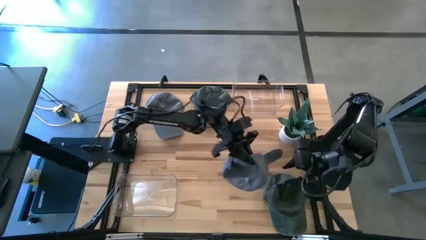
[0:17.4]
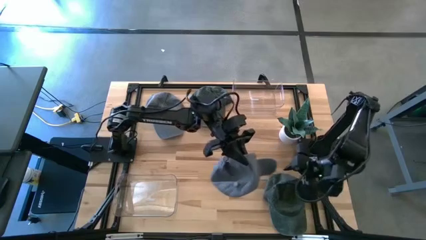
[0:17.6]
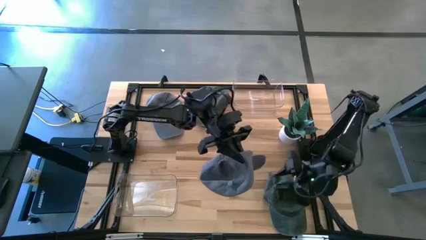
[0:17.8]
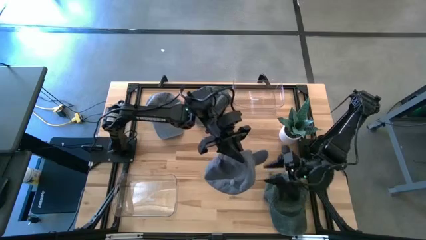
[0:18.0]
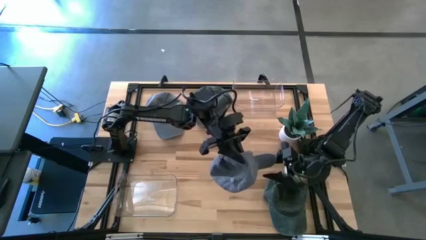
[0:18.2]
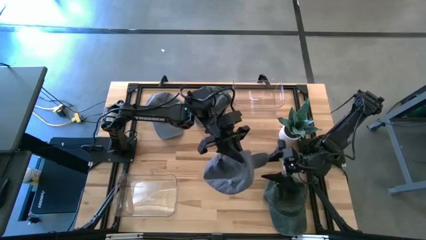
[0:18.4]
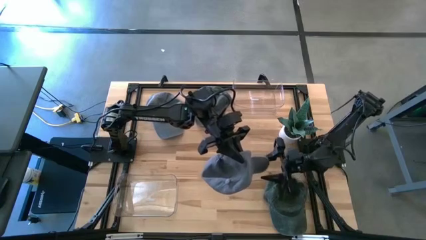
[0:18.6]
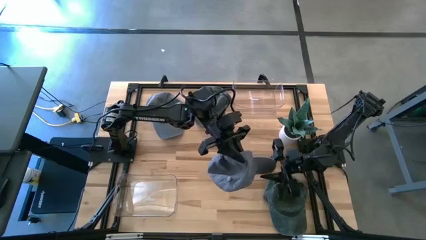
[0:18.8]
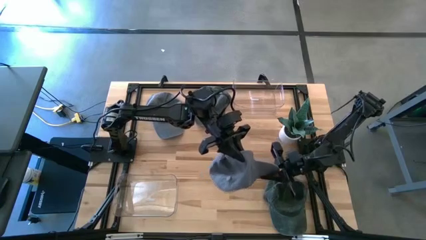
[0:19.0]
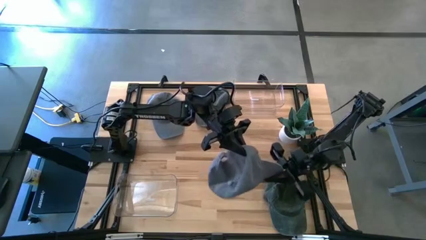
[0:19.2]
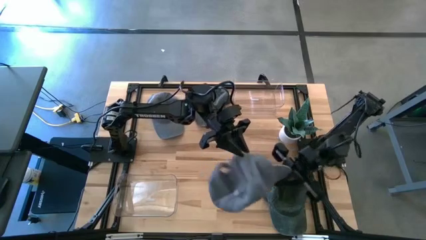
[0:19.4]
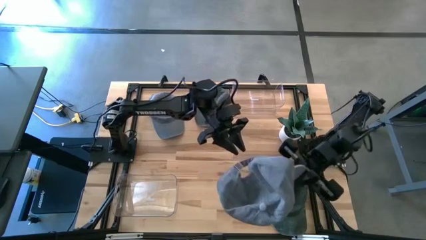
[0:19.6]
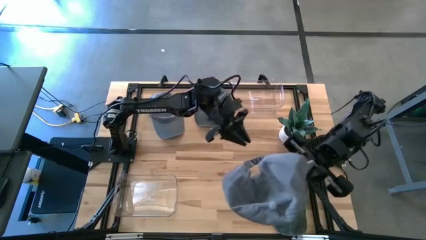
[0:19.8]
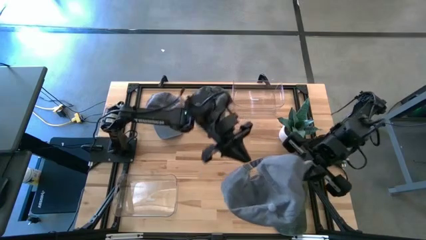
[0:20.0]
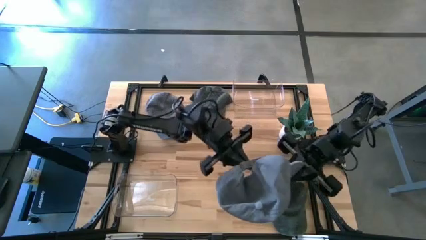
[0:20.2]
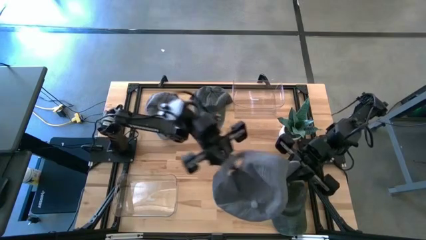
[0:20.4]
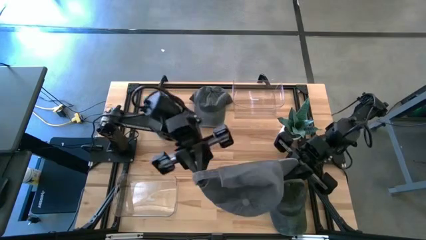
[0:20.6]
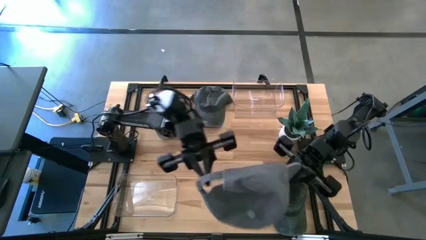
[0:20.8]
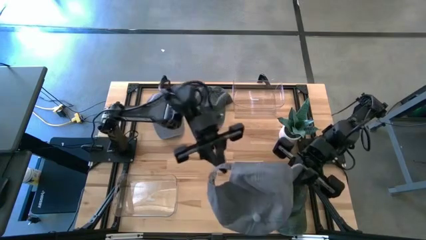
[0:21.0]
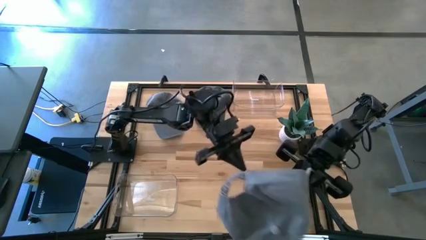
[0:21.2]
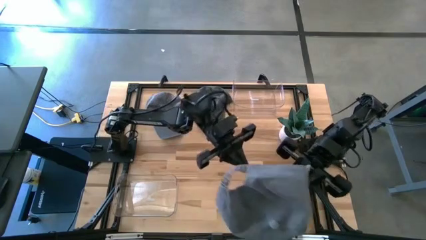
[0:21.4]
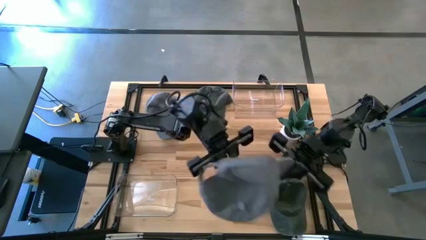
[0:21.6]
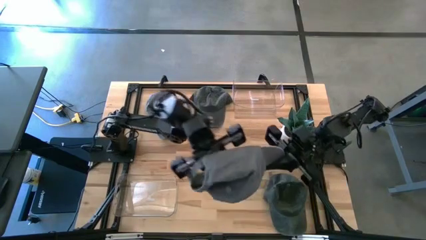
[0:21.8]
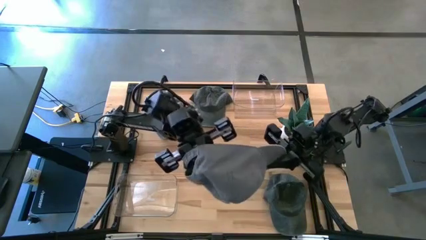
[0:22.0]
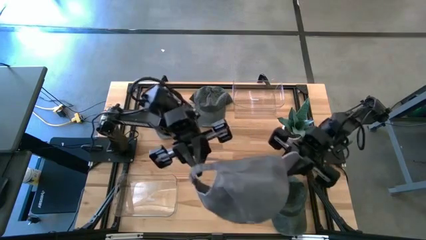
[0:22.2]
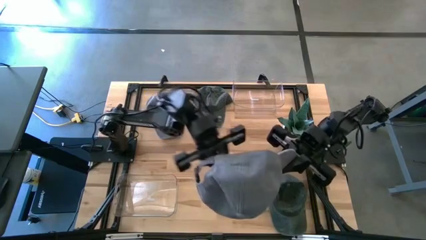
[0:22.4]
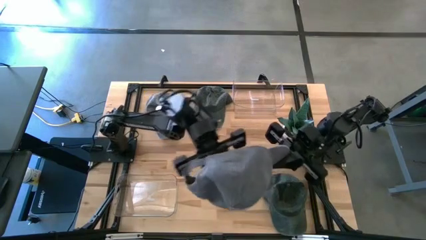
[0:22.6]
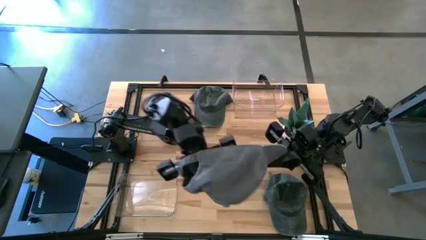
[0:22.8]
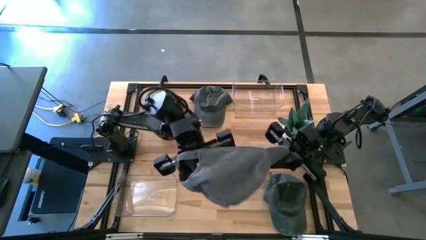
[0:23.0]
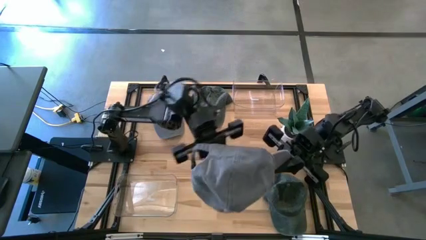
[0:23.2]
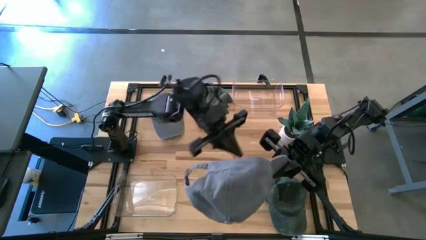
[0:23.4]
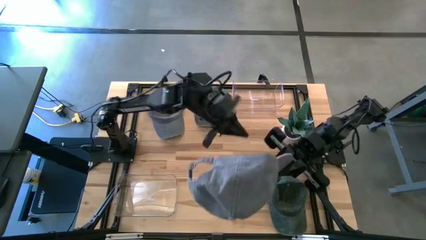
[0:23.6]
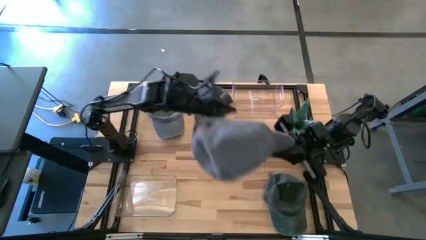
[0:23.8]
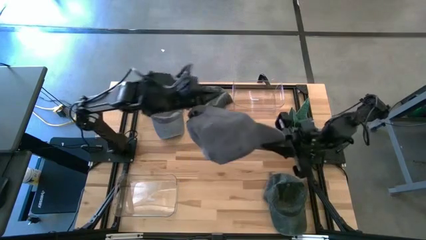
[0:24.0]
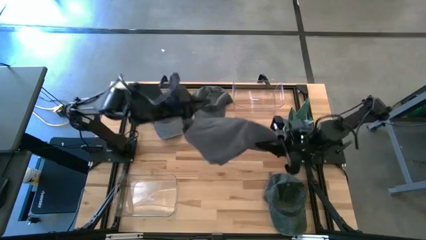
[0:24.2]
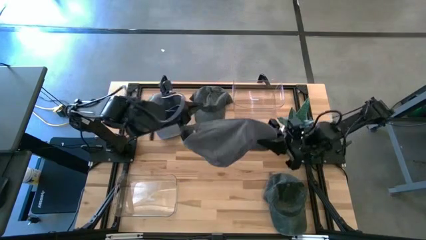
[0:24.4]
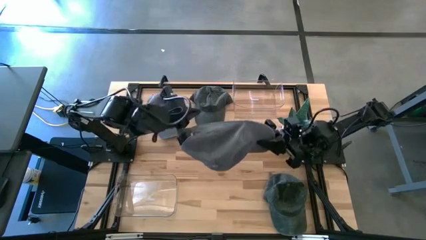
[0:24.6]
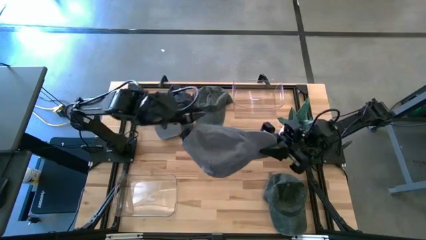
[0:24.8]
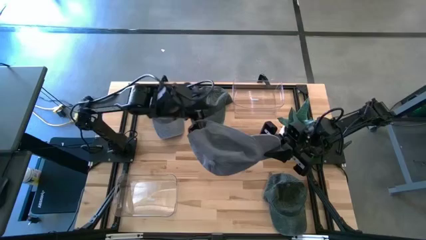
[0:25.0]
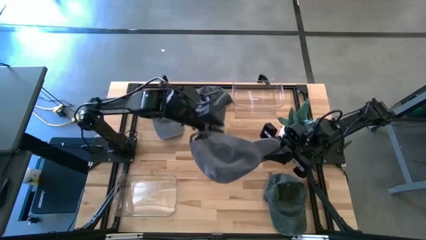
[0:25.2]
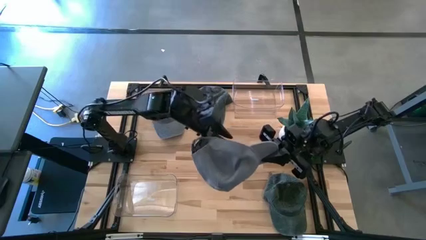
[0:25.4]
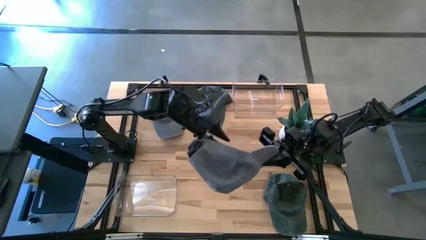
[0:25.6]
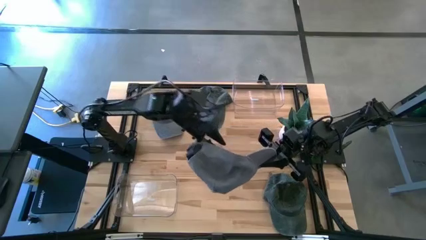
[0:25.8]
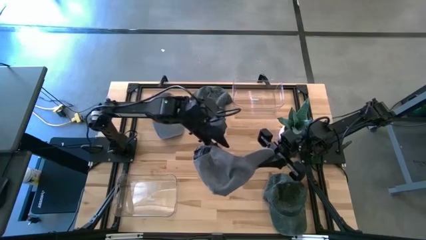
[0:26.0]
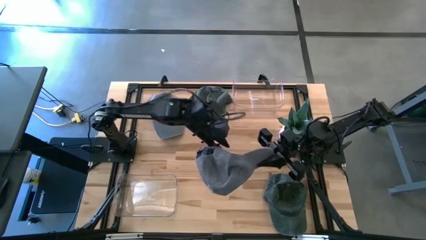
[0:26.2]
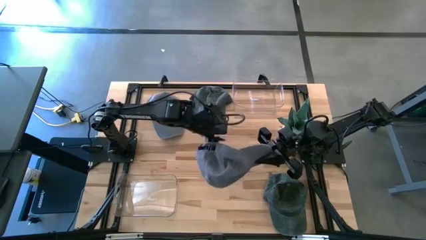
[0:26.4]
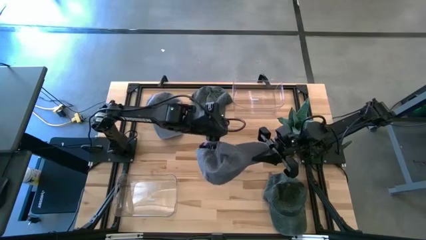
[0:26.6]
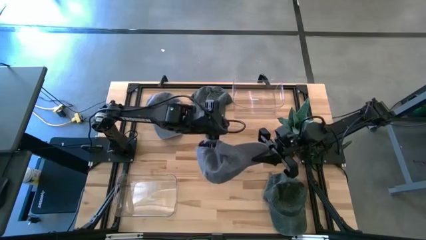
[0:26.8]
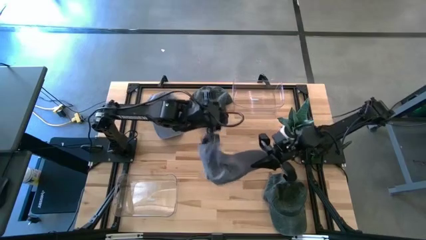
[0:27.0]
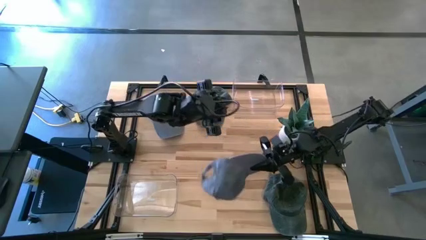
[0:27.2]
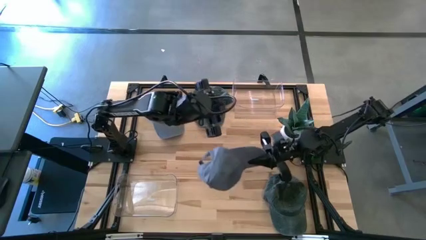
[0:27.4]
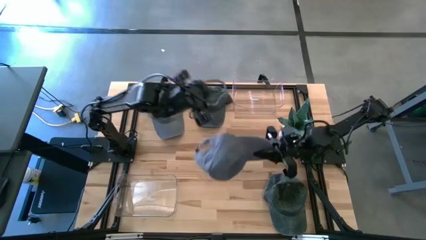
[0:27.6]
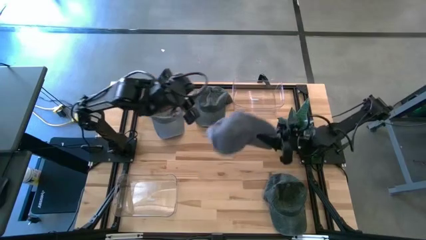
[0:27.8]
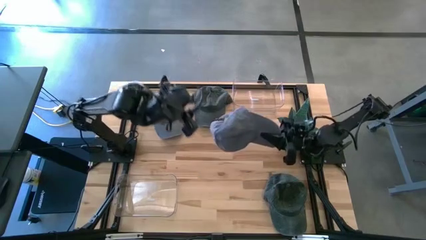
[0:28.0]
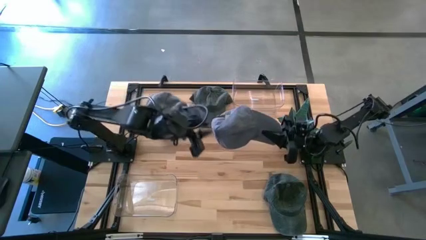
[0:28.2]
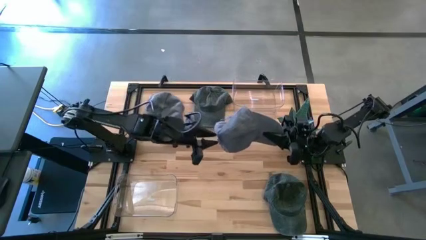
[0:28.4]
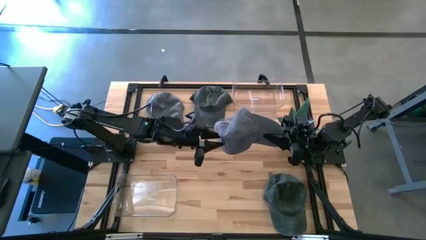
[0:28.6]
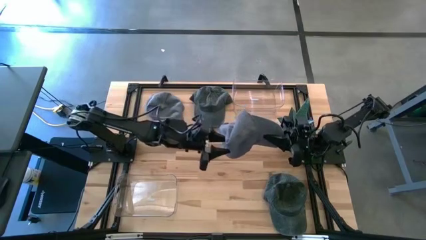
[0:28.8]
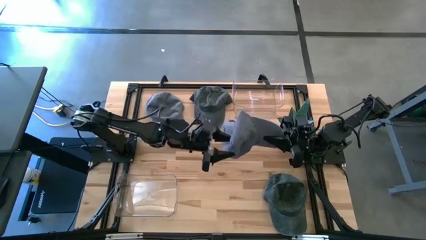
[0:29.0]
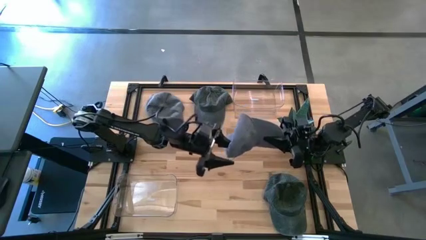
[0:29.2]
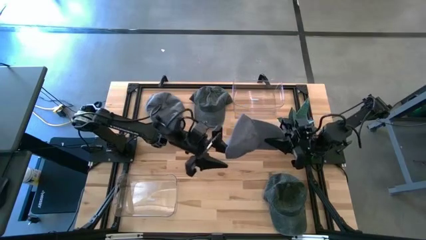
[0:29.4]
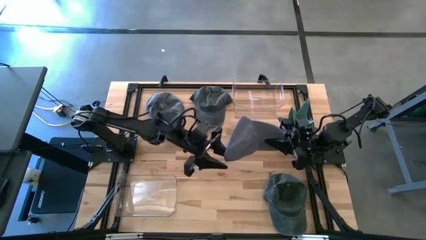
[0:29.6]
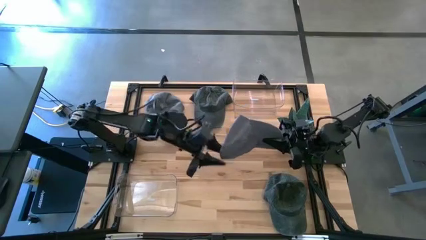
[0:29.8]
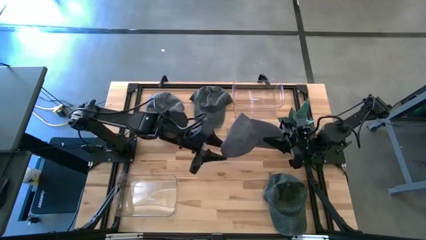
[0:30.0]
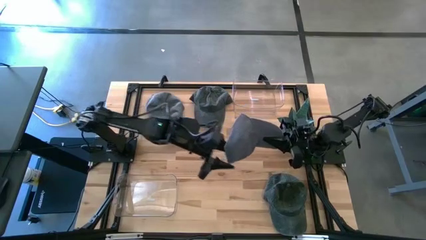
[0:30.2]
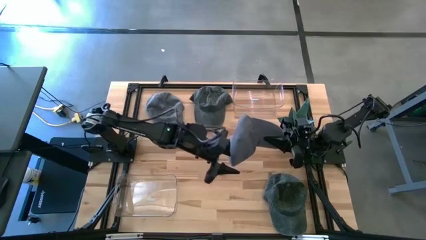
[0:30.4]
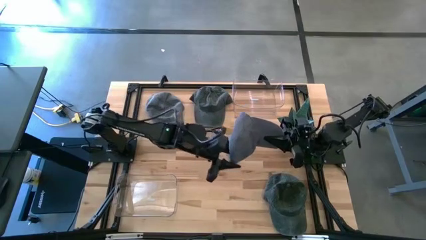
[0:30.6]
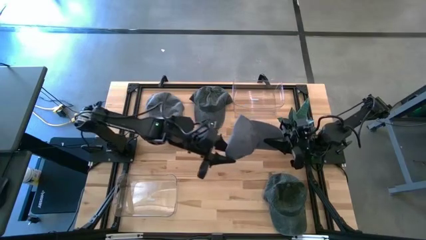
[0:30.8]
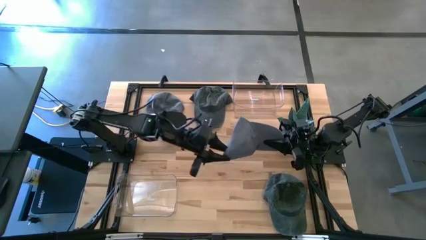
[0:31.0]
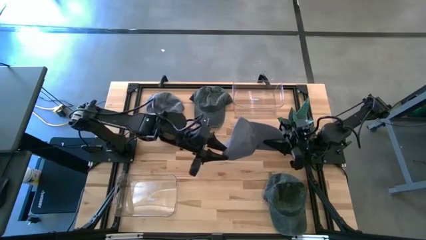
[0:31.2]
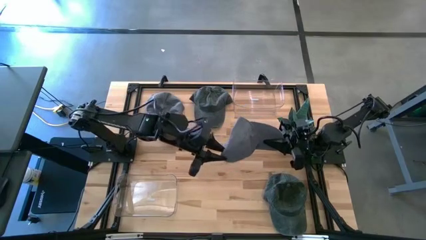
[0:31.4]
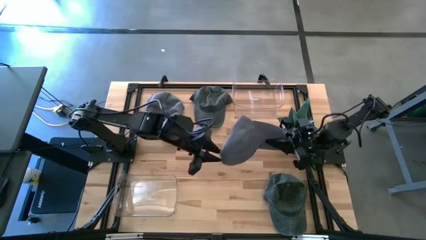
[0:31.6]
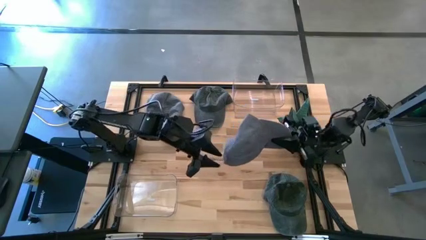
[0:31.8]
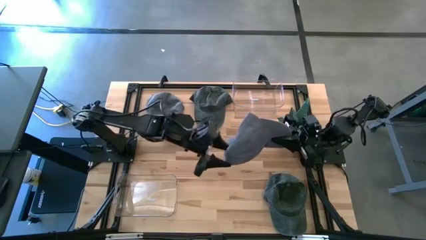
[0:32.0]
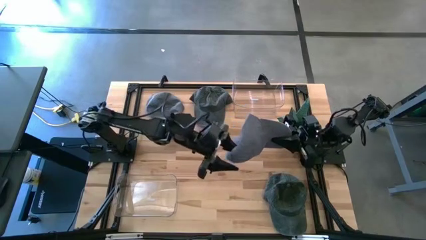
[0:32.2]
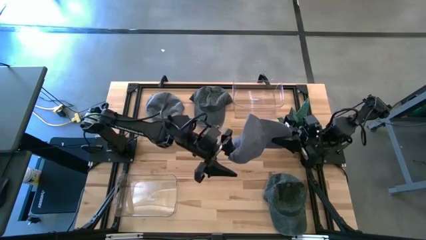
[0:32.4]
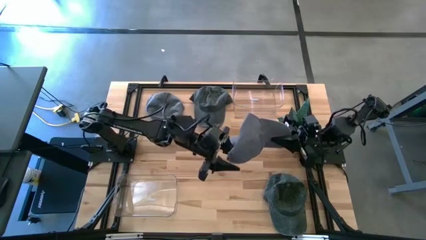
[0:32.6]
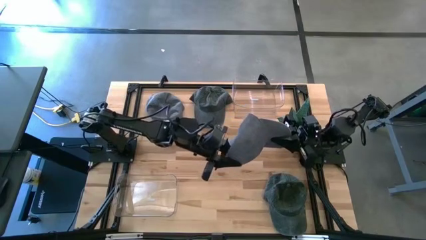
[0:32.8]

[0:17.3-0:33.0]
Task: Pick & Place hat
Put the bottom gray cap into the top transparent bin
